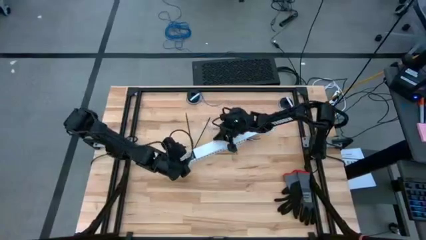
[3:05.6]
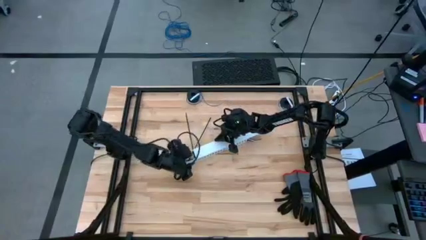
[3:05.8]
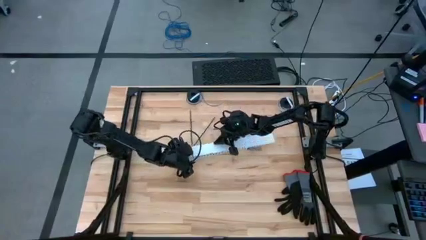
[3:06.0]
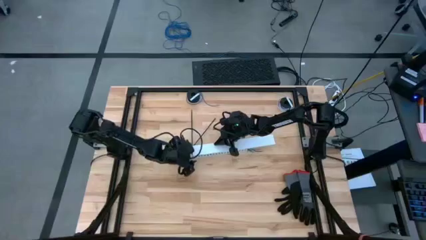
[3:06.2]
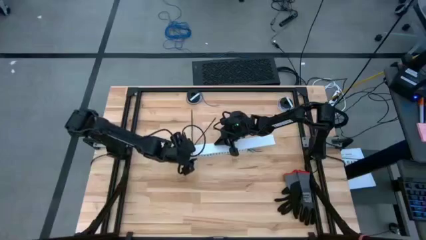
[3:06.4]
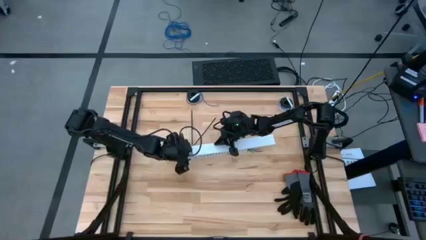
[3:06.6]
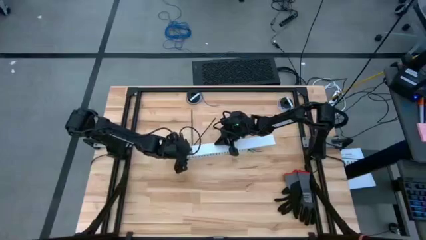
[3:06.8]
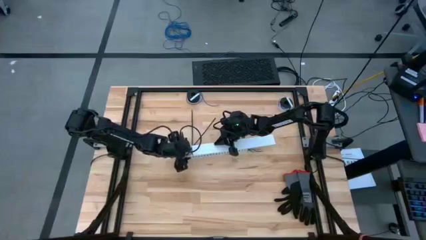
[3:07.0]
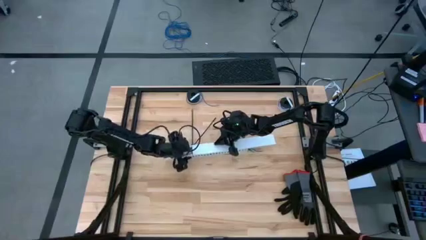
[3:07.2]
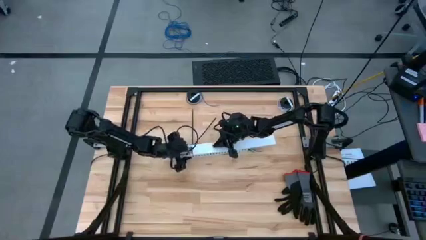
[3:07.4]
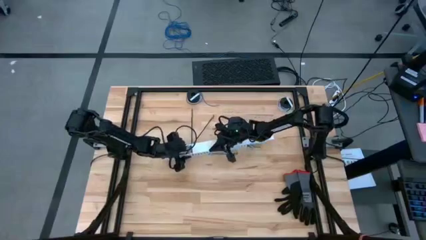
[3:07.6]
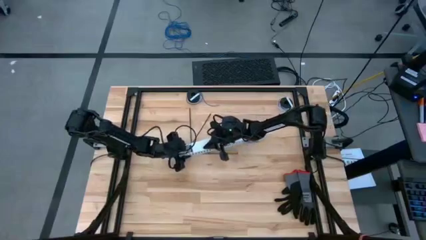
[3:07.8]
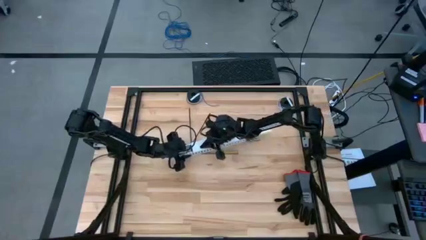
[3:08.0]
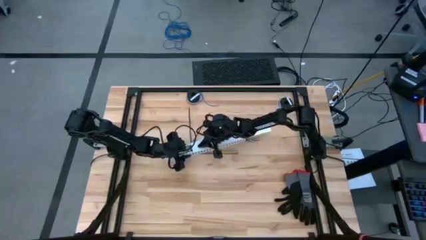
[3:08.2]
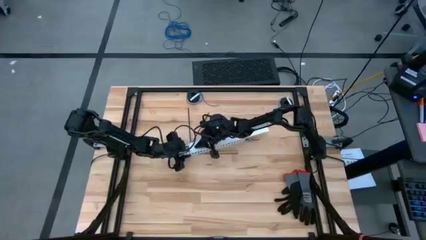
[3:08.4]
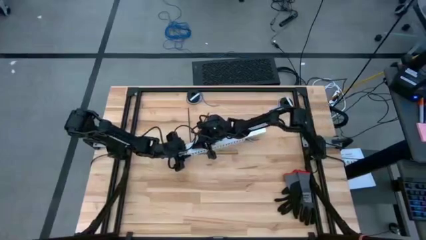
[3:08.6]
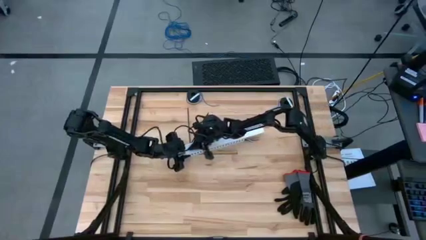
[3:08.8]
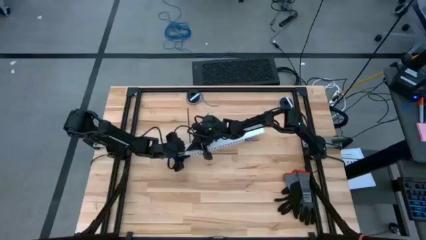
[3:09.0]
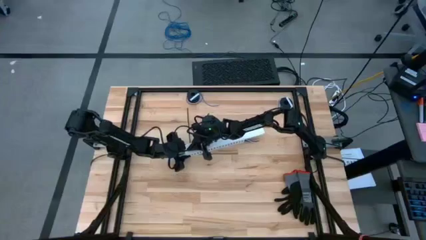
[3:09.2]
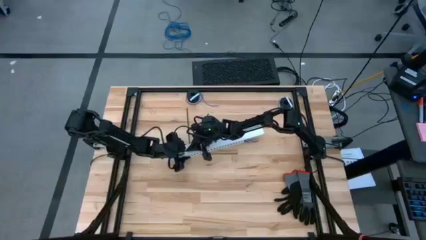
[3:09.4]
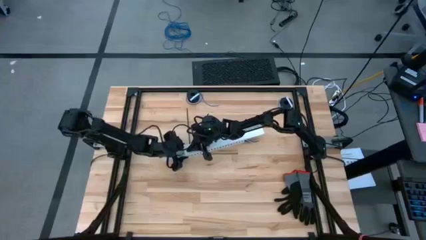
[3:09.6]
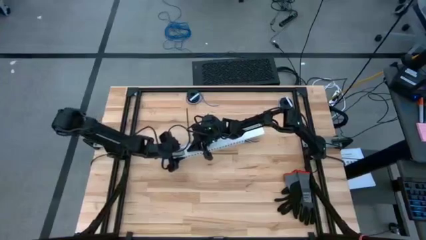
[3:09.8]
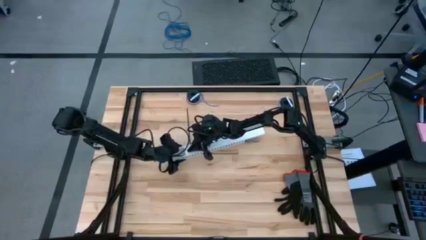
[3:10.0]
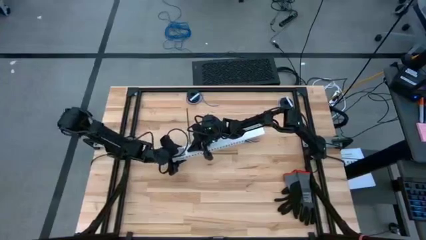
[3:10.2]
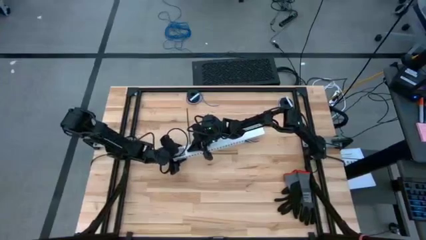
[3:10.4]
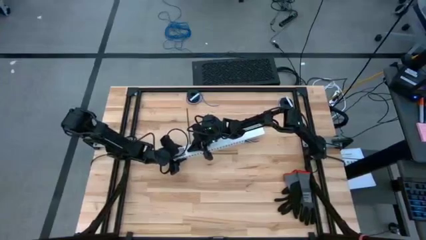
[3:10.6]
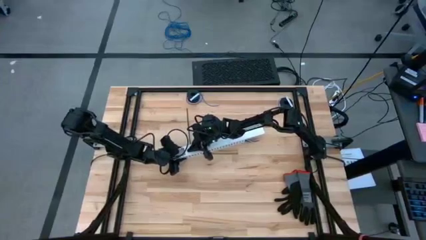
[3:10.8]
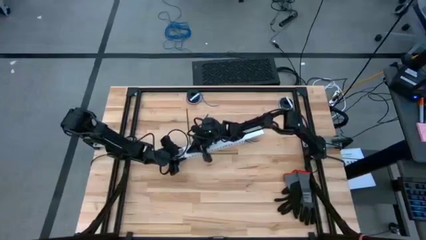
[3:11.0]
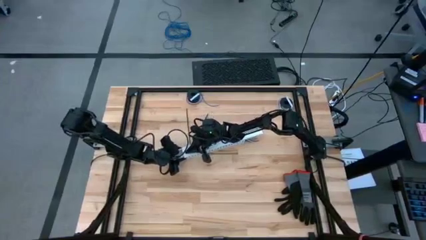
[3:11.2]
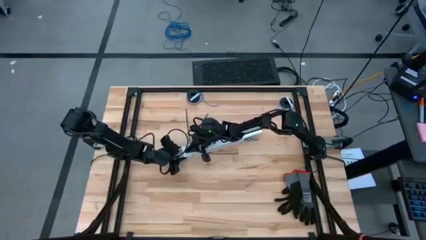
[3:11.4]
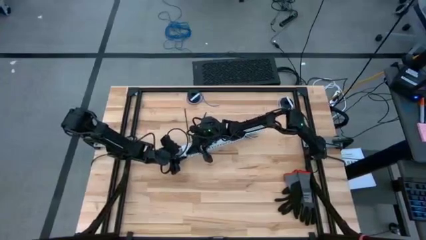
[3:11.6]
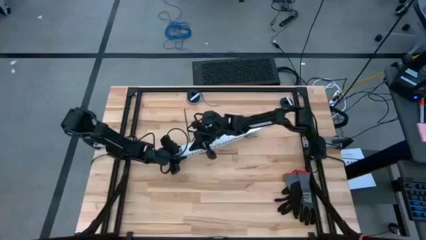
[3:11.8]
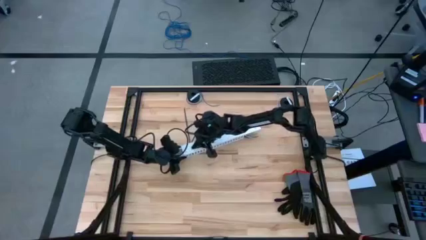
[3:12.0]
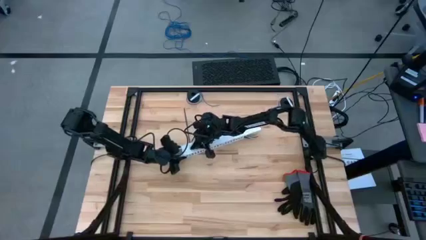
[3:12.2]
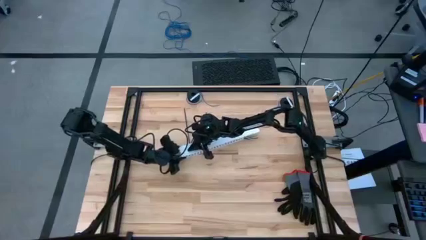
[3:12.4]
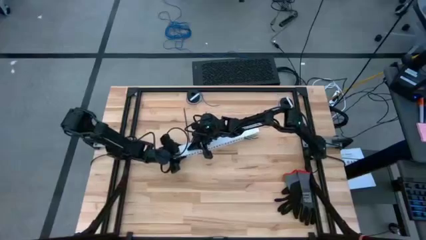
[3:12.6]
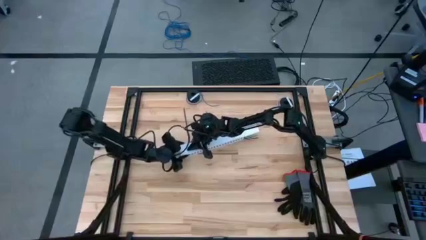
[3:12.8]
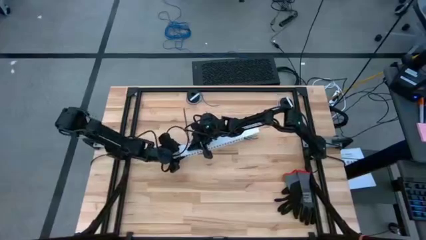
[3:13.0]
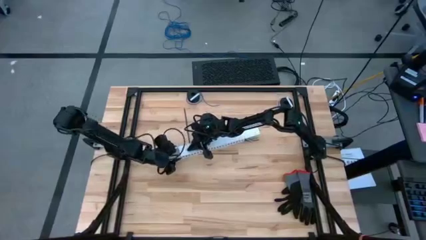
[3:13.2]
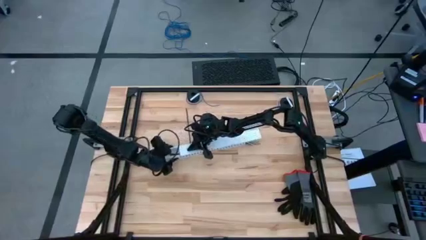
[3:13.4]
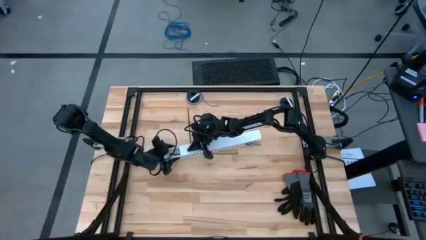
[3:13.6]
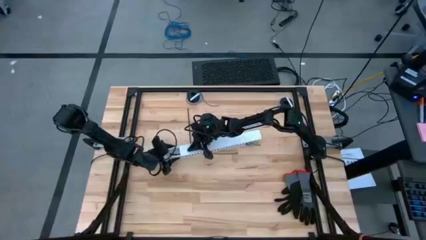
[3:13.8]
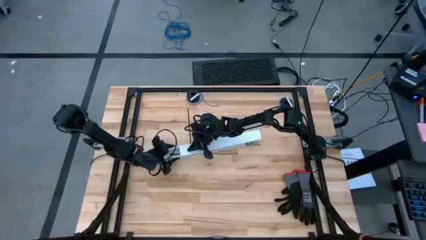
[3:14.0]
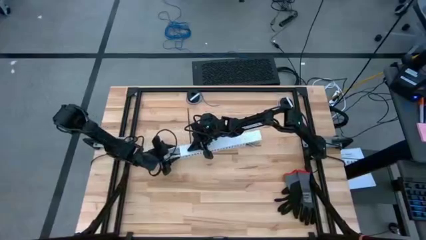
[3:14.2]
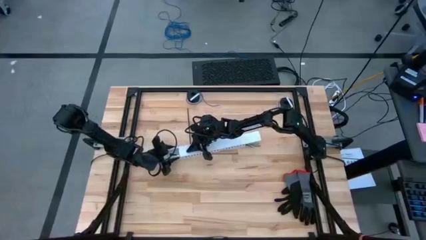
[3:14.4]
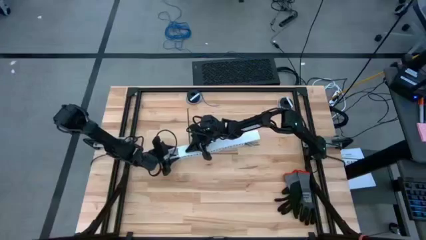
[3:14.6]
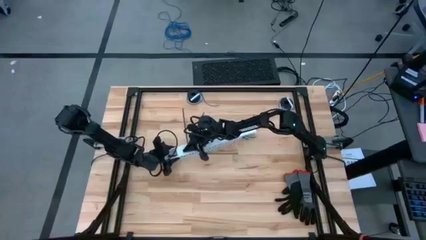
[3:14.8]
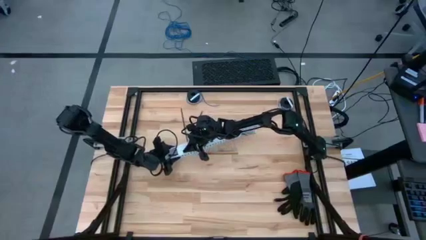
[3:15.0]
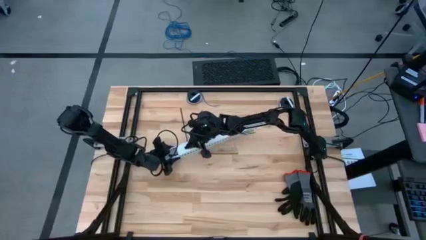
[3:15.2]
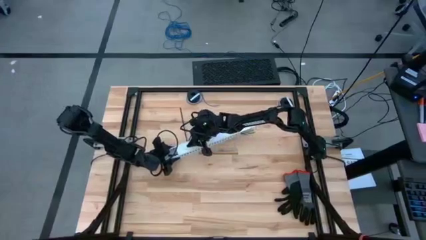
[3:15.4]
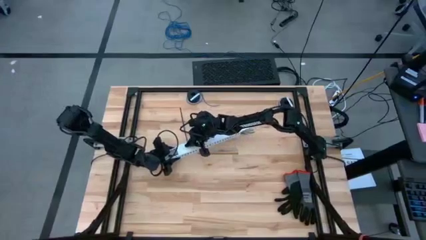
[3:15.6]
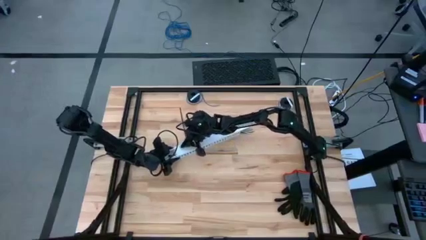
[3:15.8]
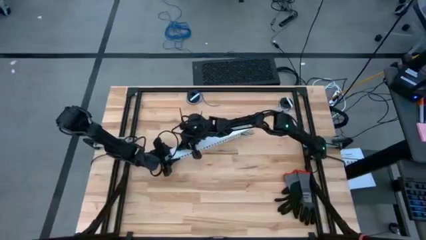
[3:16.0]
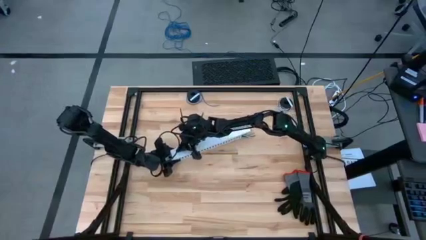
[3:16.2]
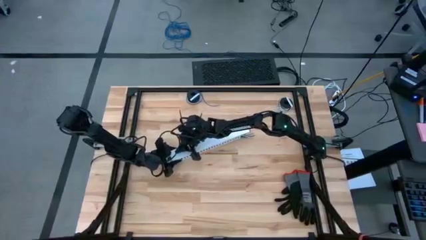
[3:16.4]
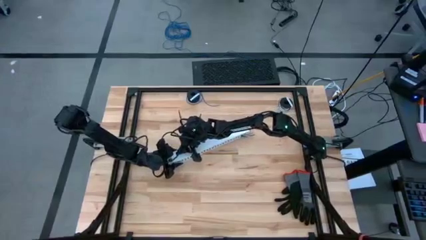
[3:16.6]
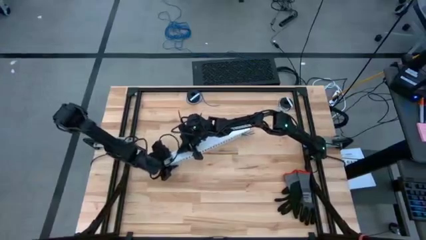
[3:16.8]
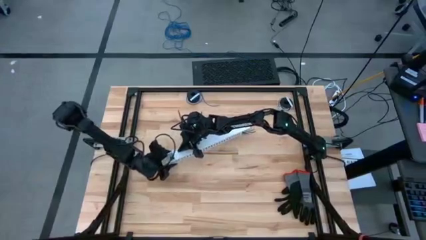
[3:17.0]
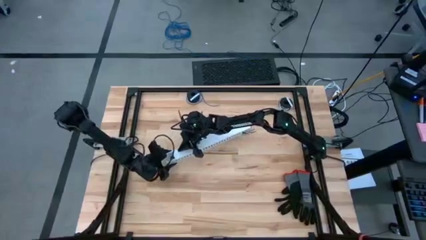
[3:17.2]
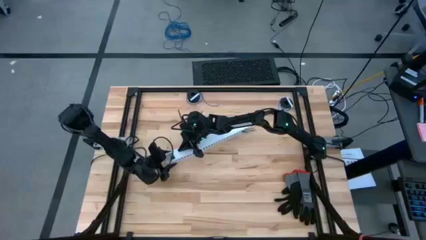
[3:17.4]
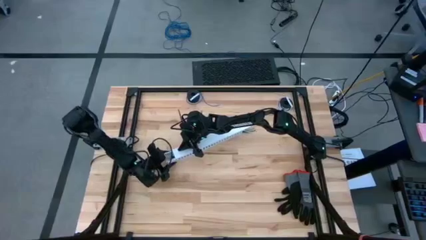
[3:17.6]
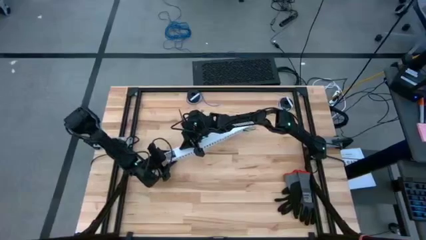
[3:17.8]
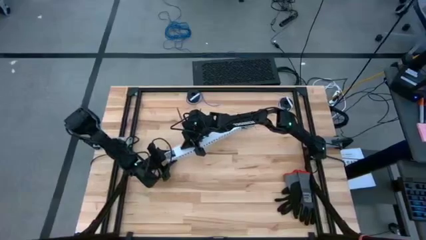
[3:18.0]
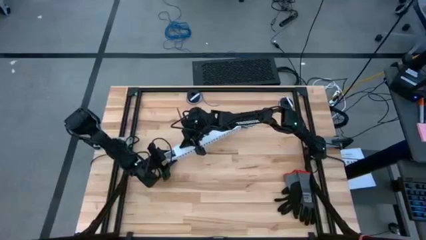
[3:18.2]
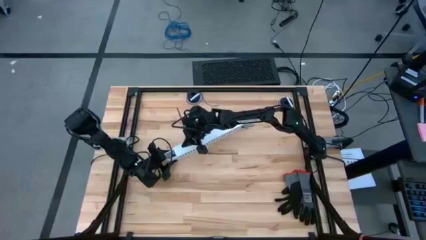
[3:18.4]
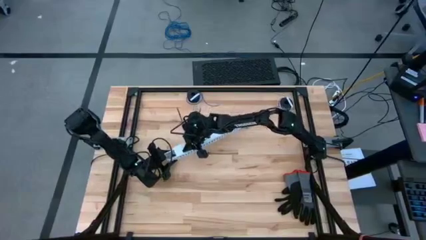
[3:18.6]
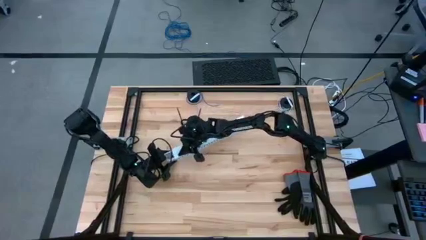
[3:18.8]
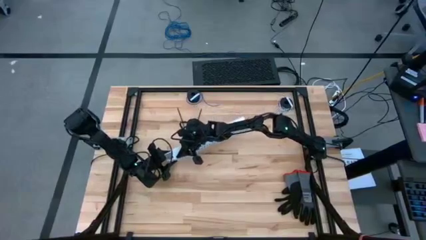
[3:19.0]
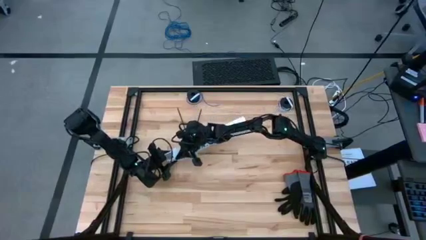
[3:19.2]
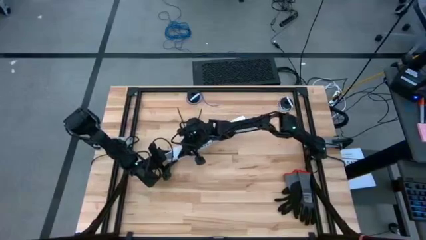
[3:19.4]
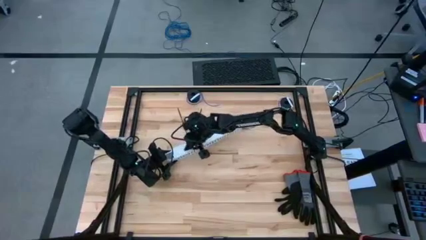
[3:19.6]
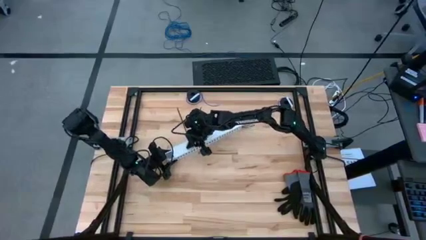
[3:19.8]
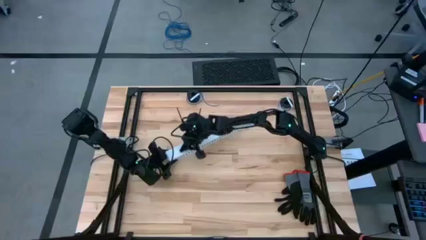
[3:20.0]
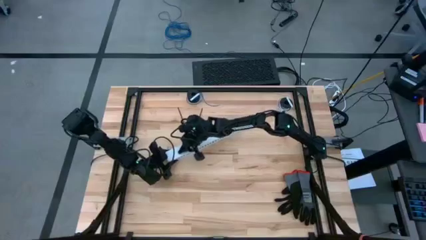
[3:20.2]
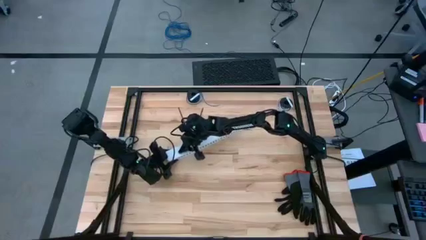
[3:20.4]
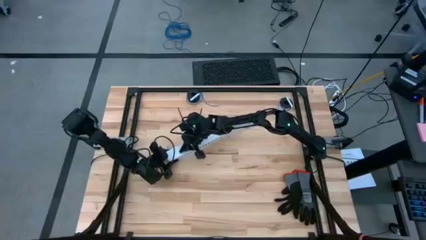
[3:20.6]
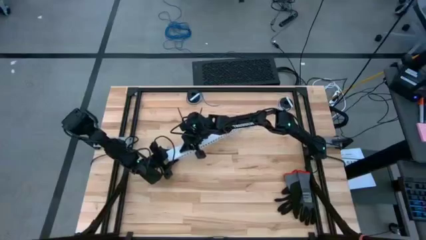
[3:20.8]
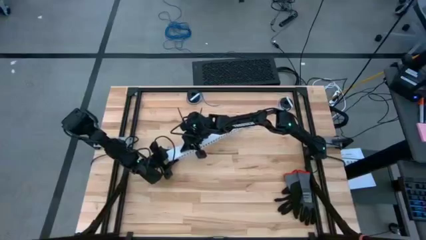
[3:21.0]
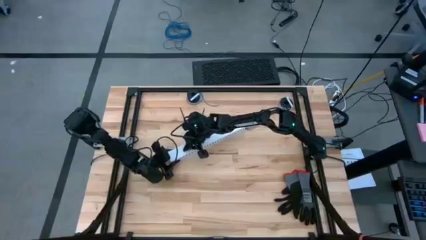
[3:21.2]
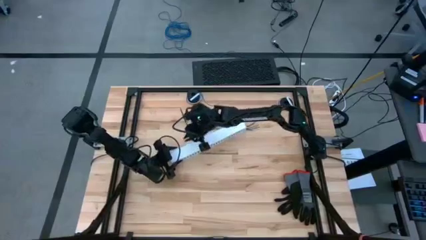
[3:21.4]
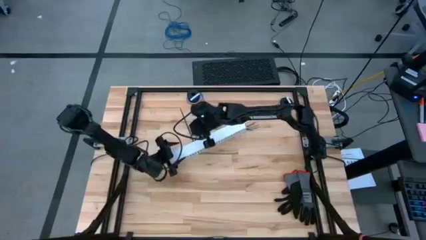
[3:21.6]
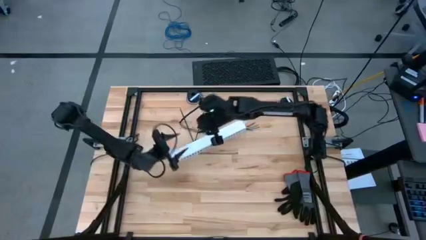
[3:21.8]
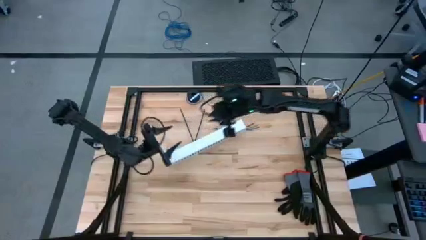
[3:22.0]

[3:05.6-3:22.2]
Task: Ziptie cables
Close the white cable duct tray the with white cable cover
